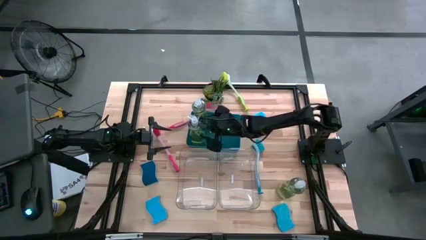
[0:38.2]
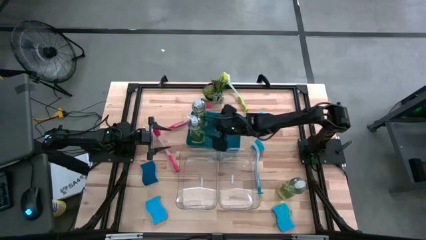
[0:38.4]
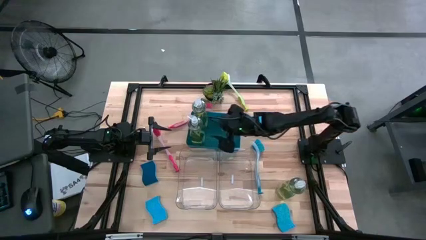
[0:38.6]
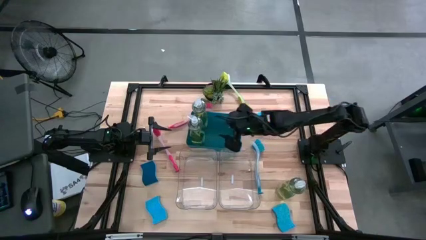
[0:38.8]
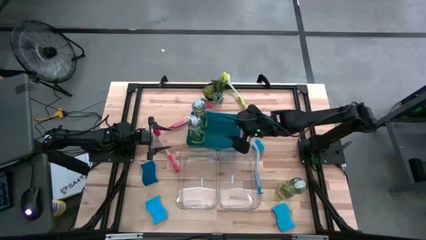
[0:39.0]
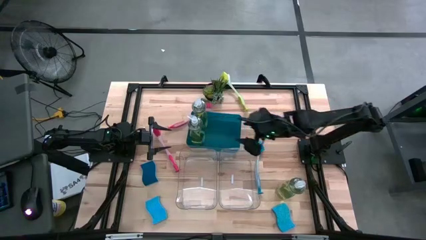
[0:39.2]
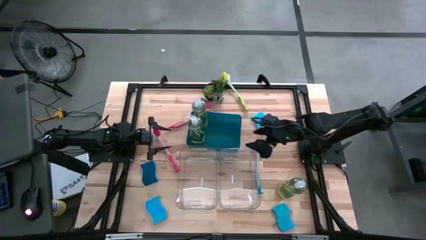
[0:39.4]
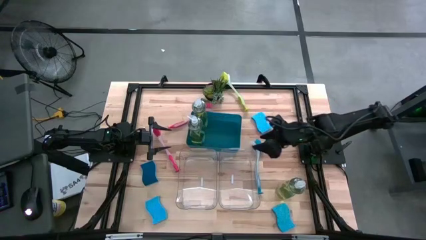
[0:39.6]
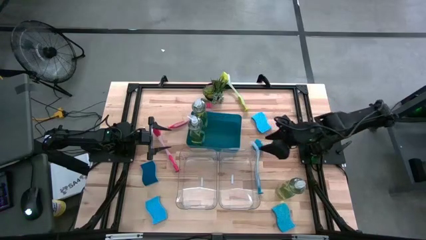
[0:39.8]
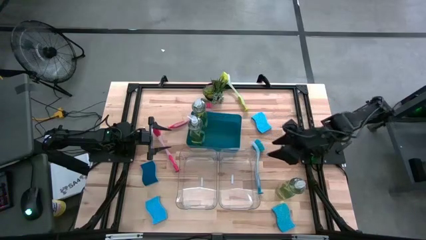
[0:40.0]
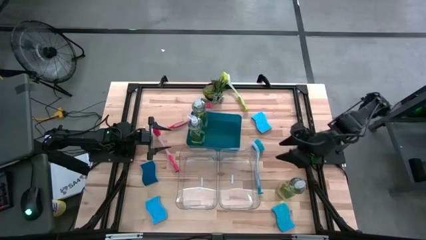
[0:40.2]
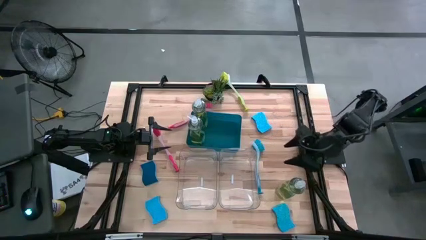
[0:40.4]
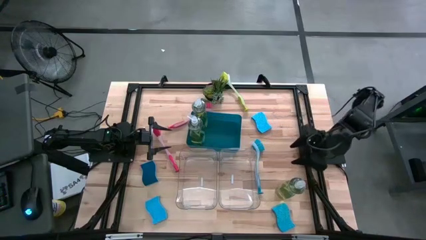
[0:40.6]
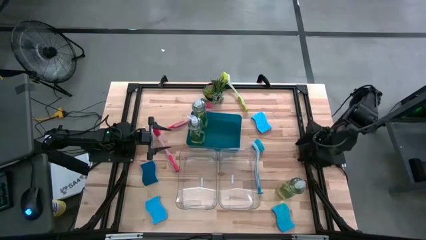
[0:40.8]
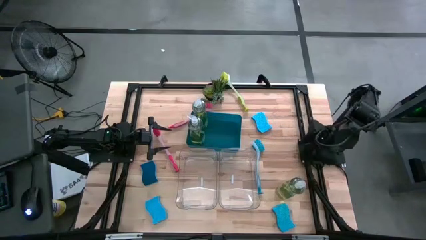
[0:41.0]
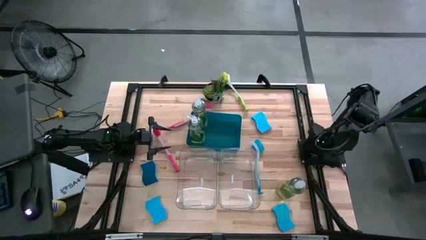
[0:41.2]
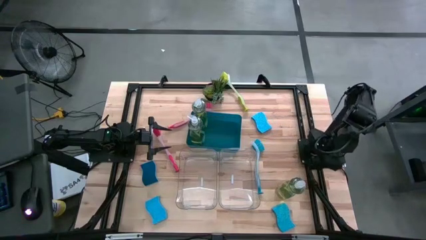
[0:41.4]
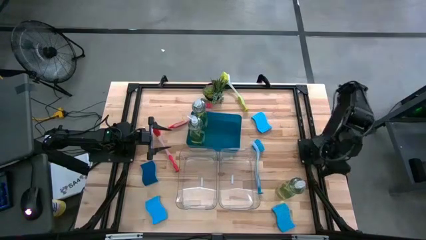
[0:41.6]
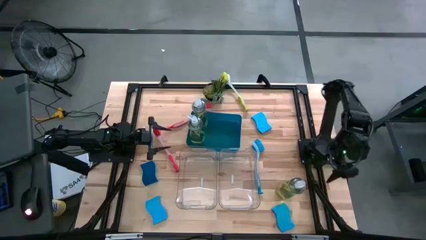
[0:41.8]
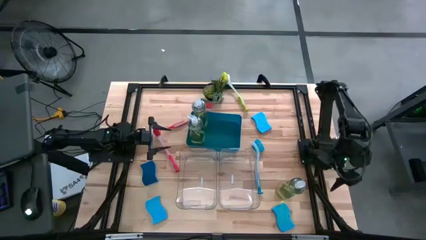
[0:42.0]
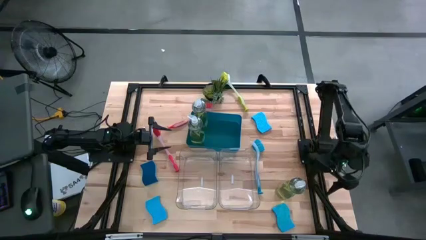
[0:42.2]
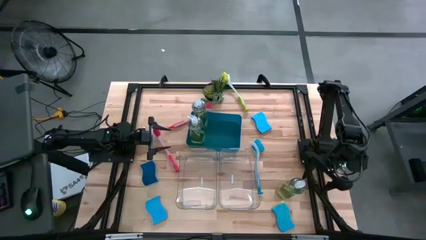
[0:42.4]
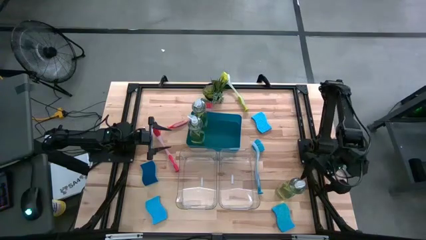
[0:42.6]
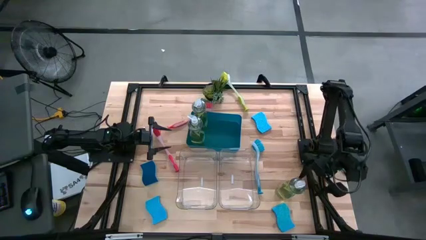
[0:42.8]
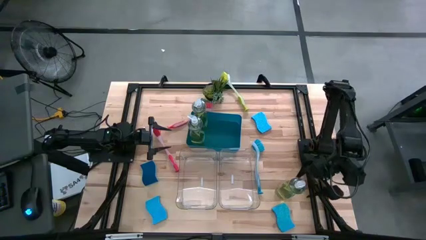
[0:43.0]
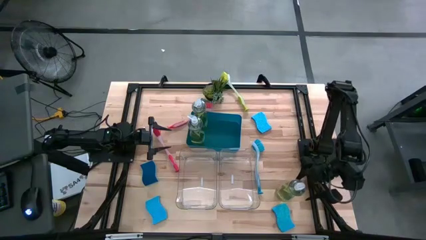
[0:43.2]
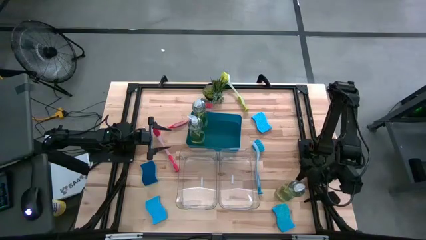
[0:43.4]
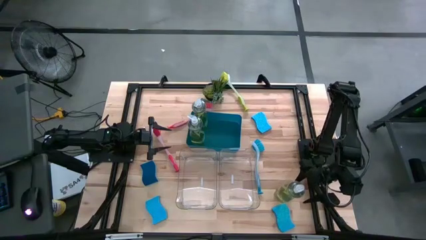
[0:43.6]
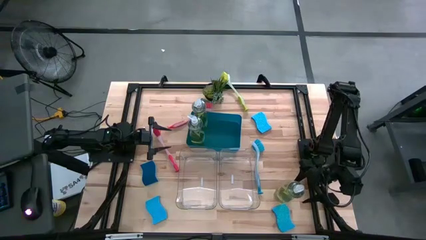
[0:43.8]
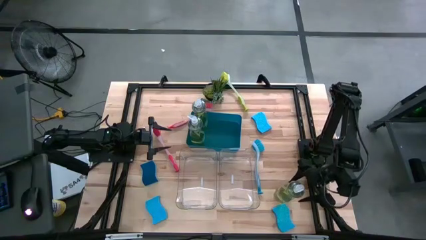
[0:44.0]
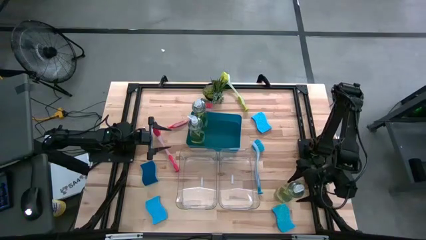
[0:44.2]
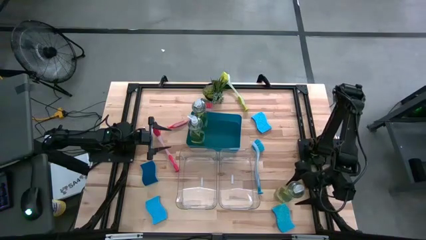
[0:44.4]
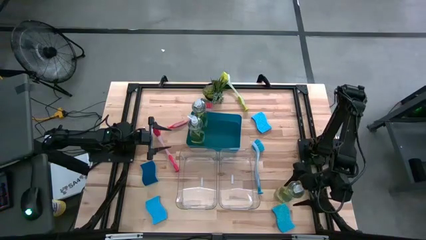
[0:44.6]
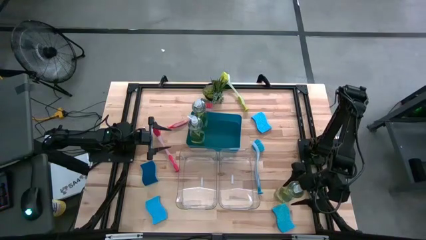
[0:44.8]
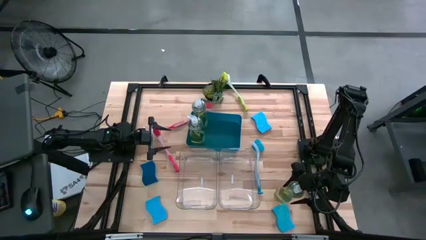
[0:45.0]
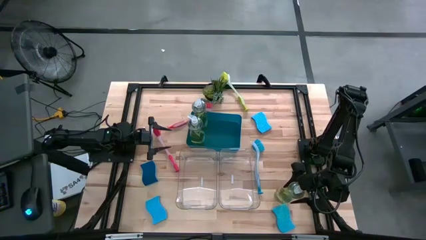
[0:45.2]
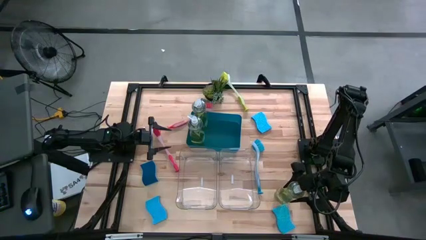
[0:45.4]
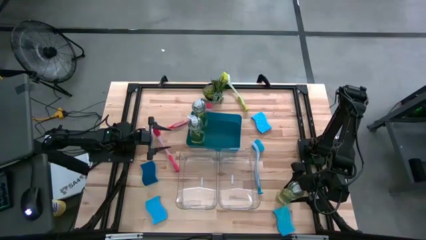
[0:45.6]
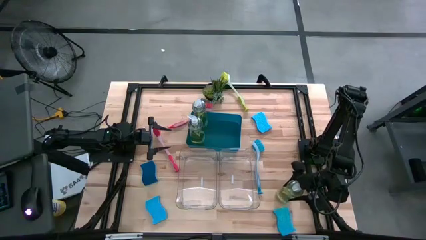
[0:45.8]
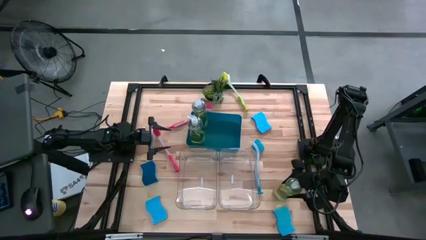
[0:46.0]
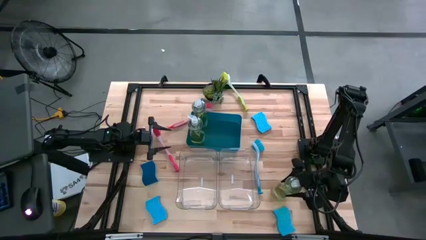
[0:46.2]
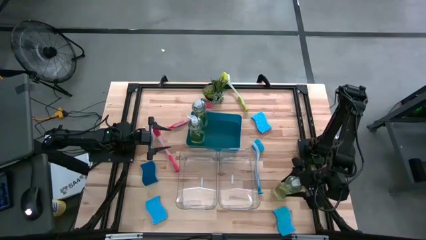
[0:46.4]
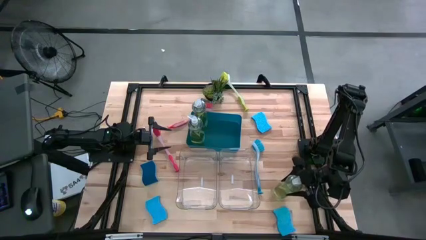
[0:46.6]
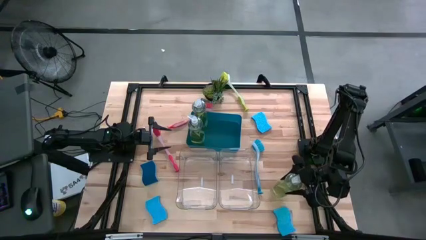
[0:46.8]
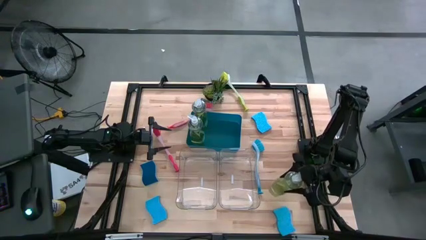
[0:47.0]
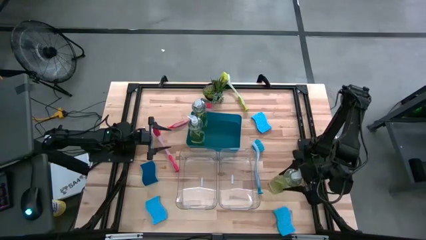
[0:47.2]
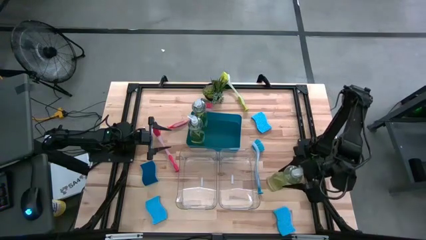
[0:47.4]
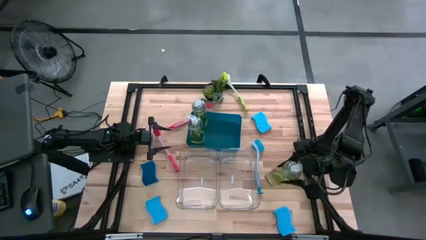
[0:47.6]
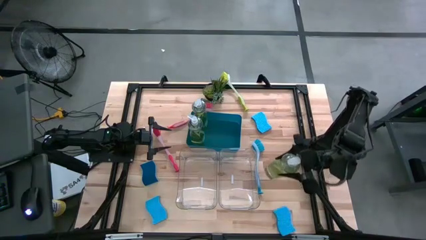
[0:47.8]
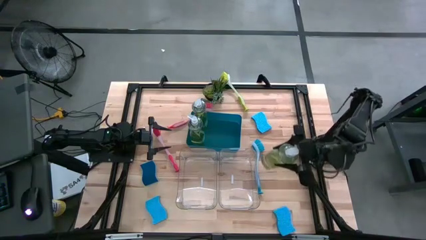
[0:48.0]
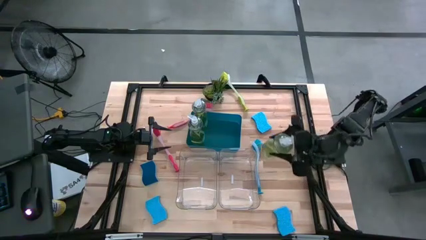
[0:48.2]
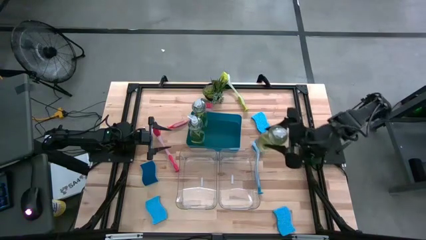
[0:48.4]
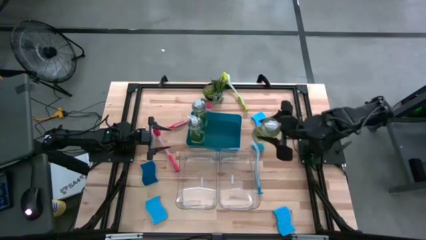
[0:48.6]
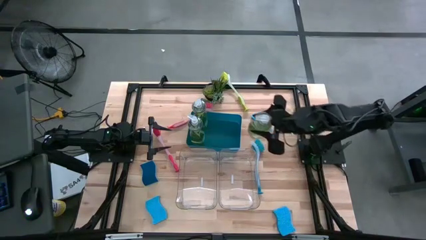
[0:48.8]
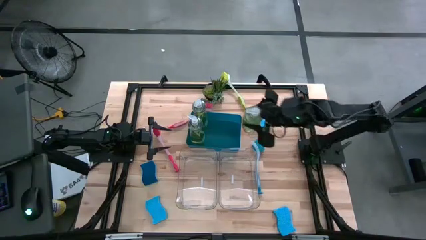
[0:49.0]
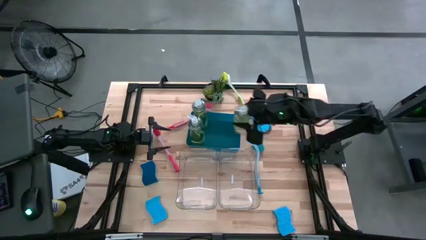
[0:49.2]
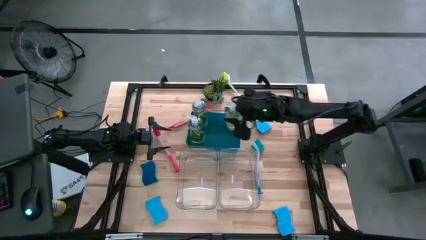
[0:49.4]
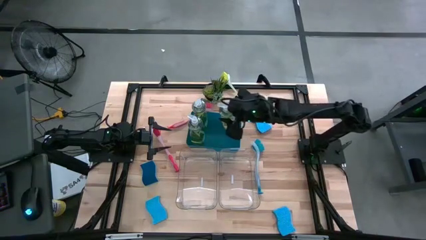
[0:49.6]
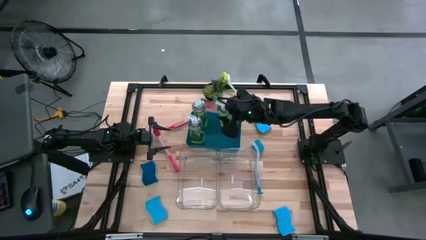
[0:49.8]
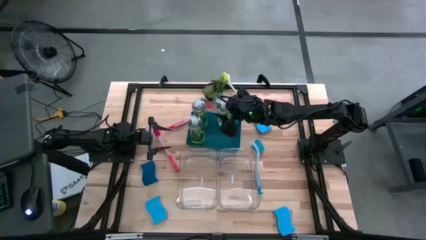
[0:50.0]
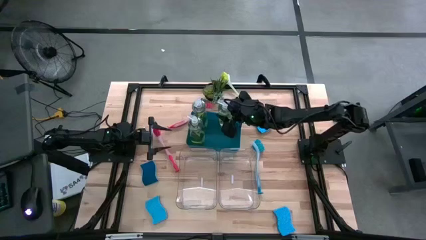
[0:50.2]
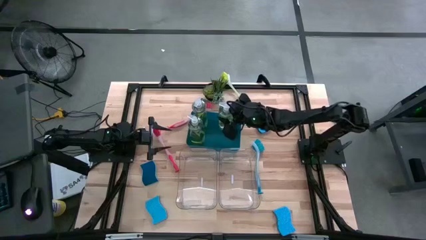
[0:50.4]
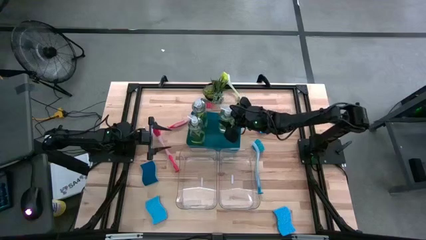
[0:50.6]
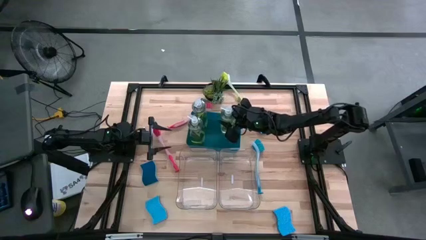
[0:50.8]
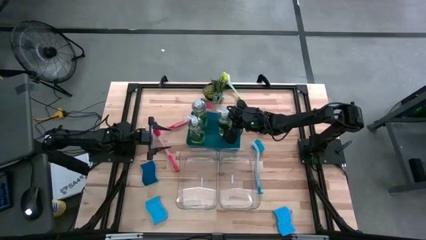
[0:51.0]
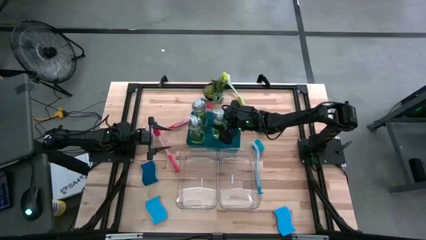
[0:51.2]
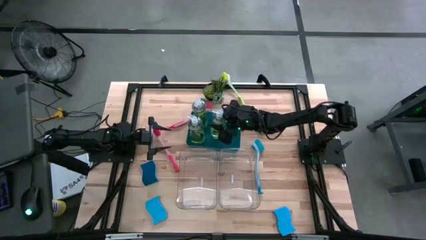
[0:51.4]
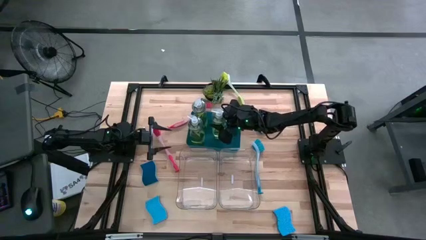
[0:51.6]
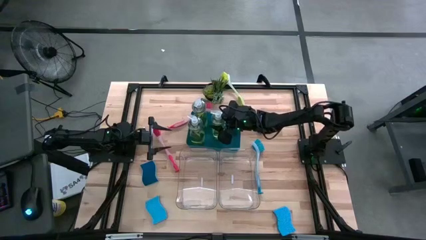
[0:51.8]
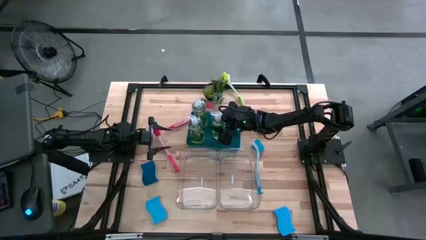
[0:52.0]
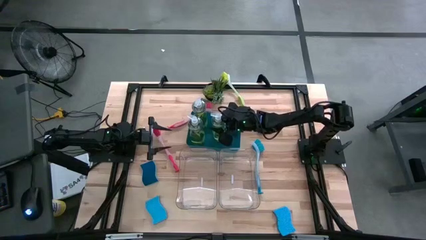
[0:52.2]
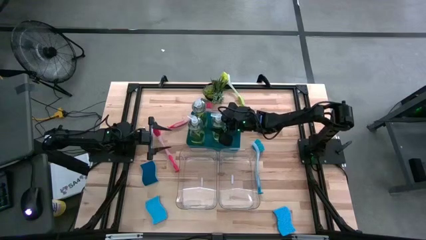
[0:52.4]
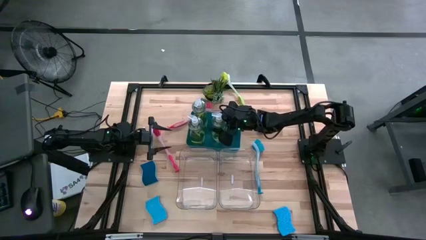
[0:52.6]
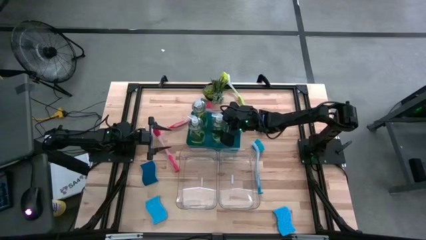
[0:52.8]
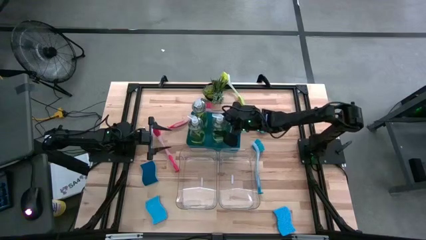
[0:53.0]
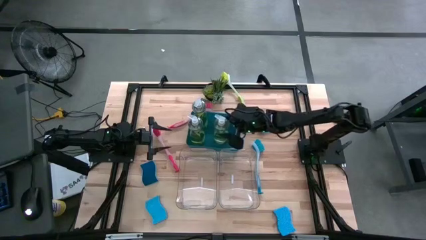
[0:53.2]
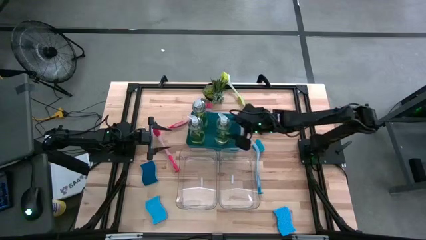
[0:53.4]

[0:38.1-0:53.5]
Task: Pick & Place Kitchen Sink Supplies
Put the green dish soap into the blue bin
